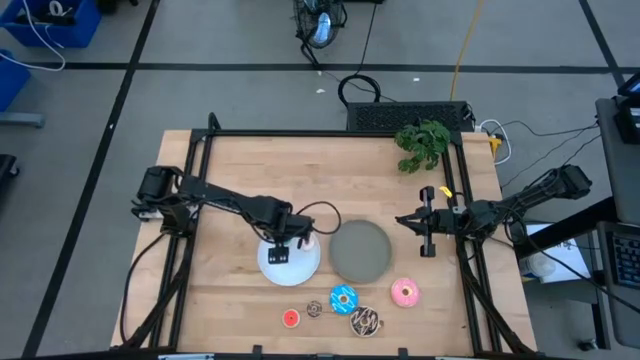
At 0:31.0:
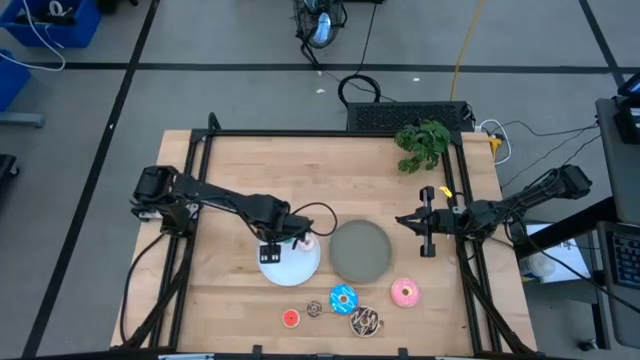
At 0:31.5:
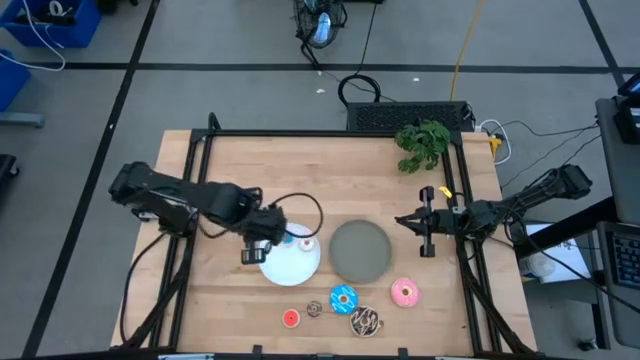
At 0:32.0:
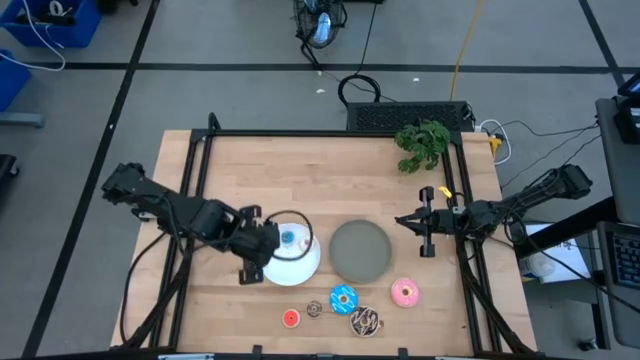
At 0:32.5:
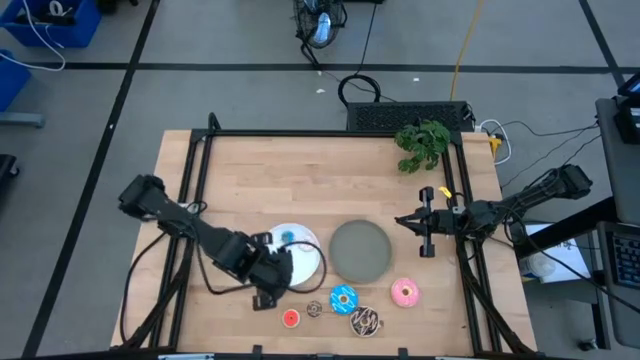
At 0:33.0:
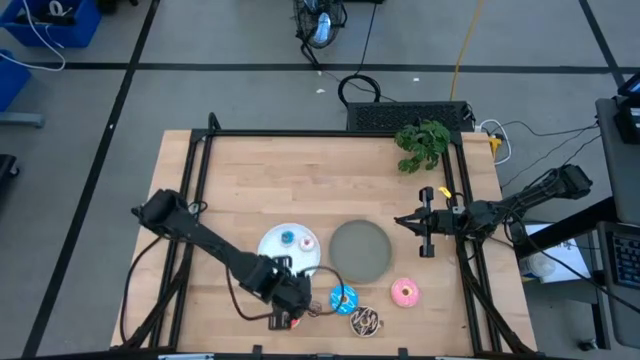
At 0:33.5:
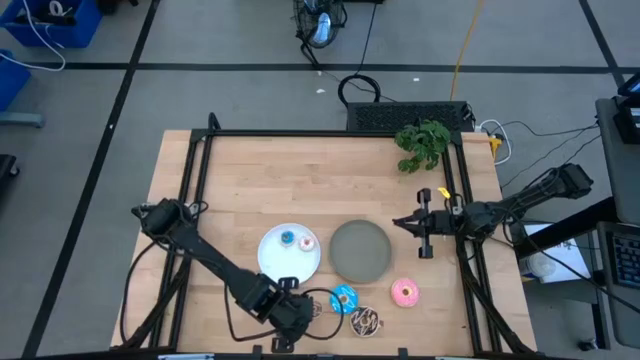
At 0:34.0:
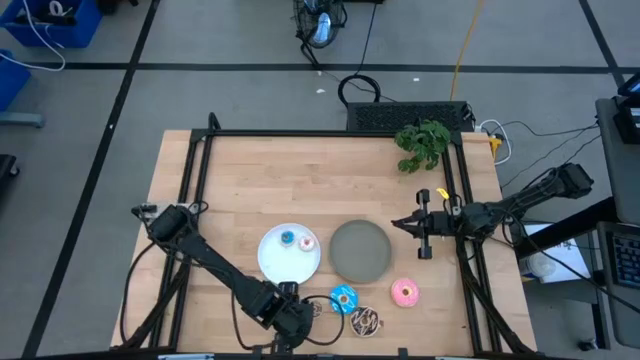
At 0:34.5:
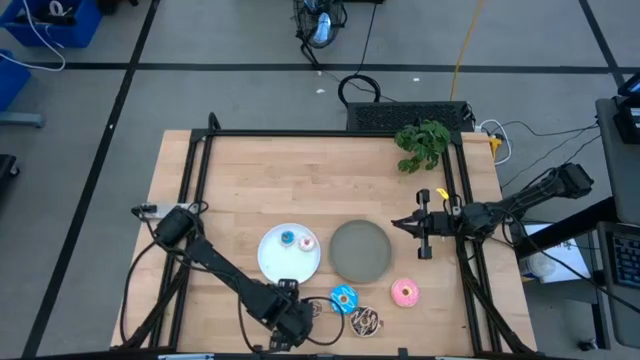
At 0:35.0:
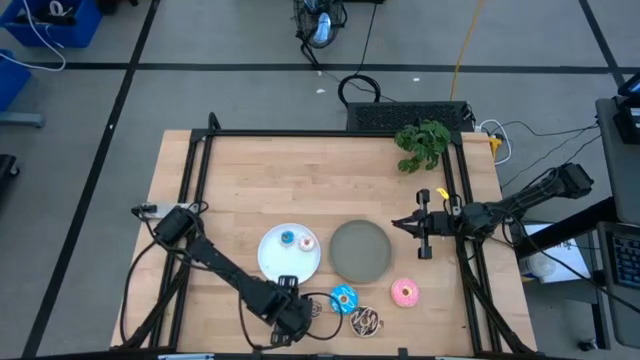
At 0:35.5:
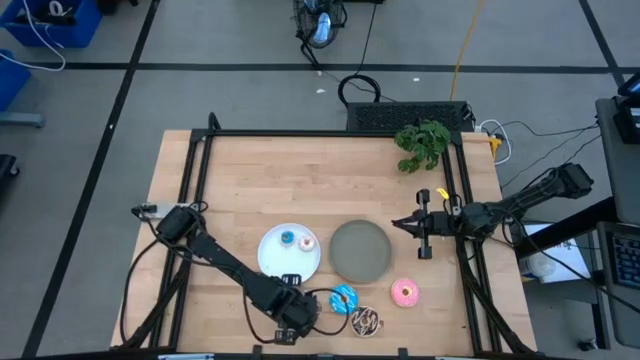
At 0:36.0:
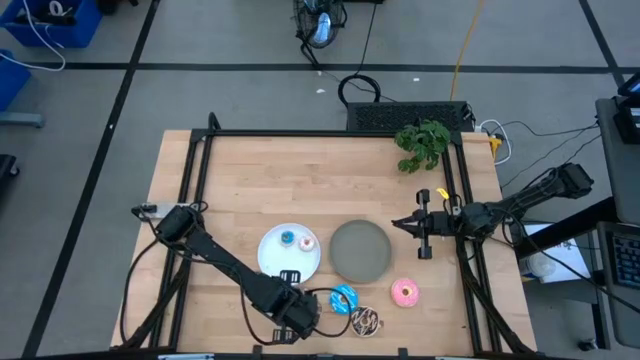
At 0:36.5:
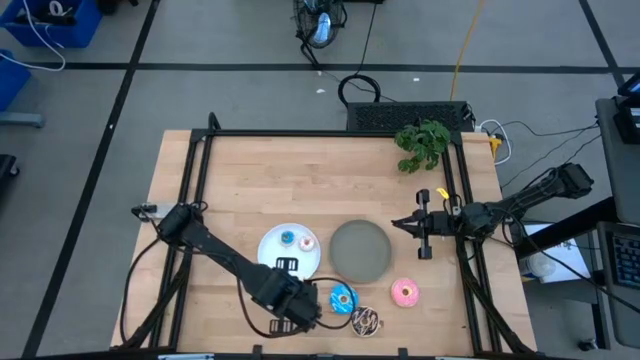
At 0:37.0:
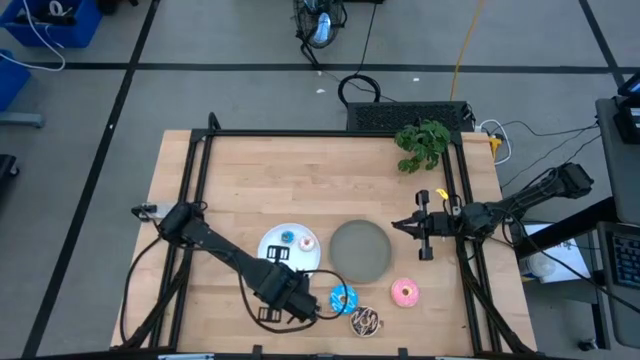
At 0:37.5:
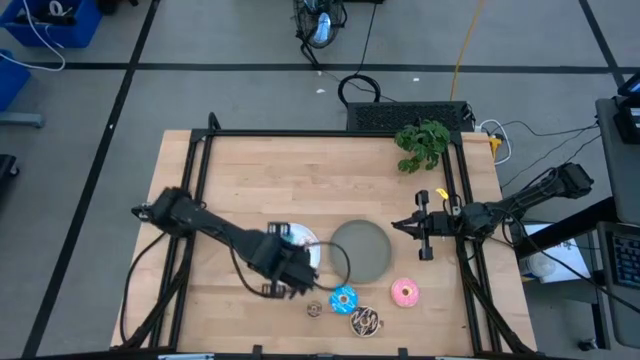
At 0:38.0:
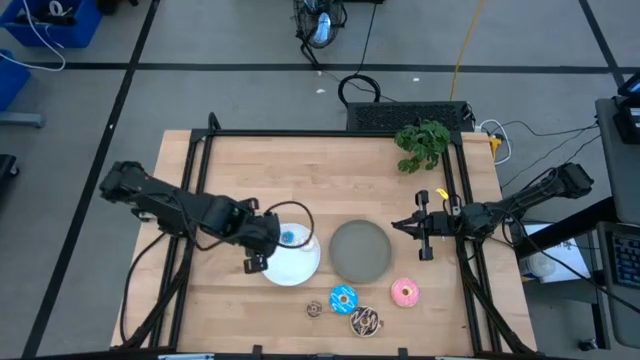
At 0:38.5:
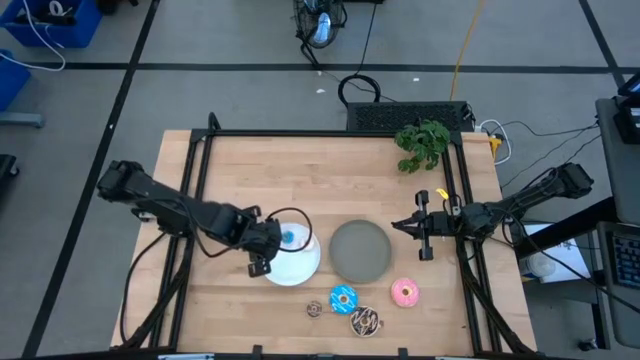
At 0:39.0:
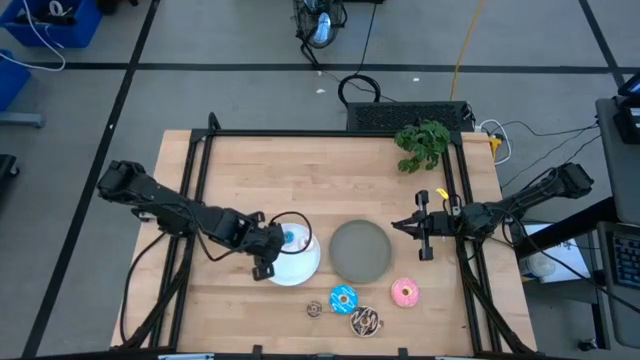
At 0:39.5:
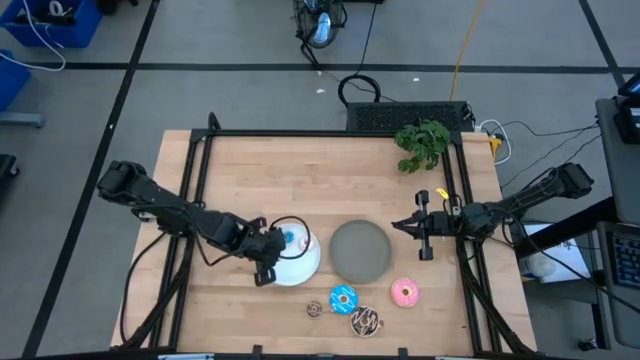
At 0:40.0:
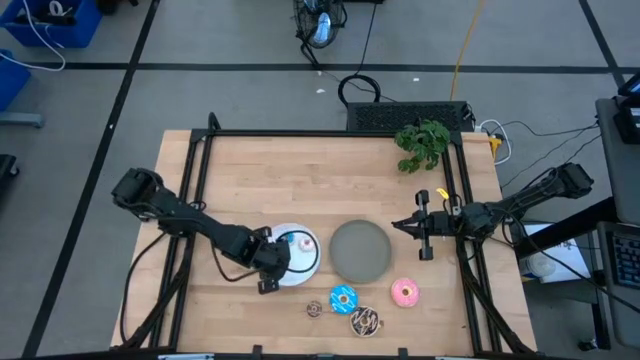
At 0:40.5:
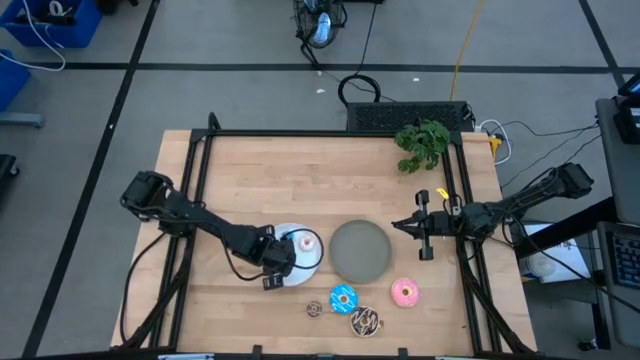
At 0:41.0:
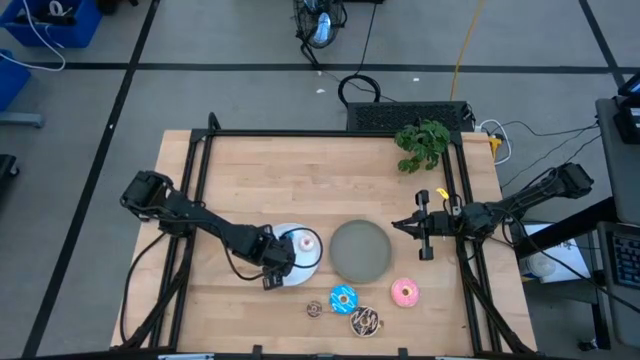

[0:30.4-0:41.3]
Task: Pick & Place donuts
Put the small orange donut on the white plate

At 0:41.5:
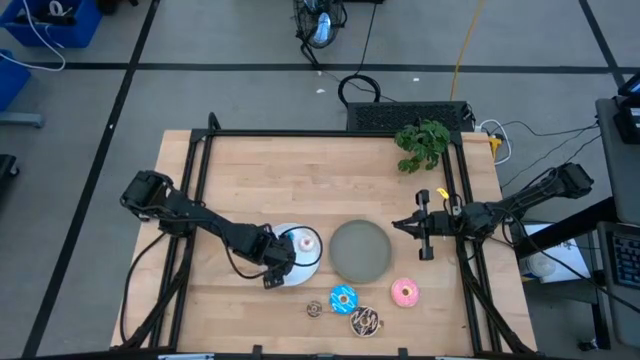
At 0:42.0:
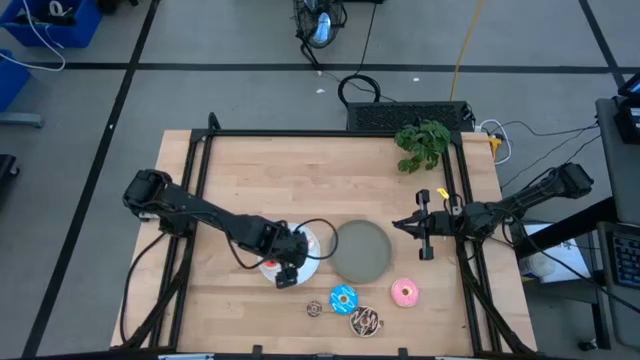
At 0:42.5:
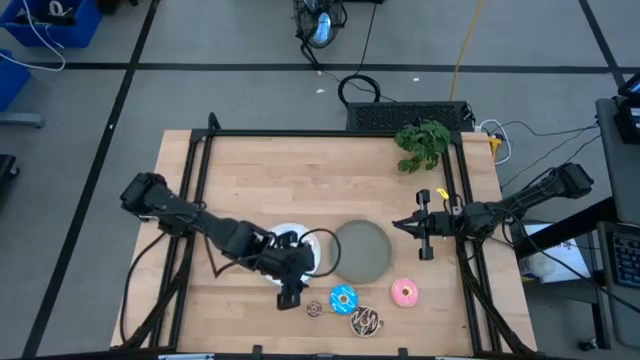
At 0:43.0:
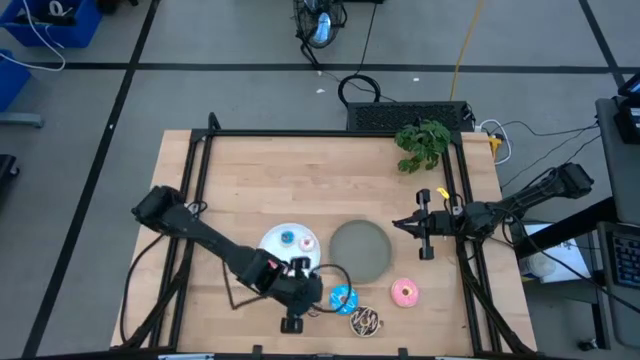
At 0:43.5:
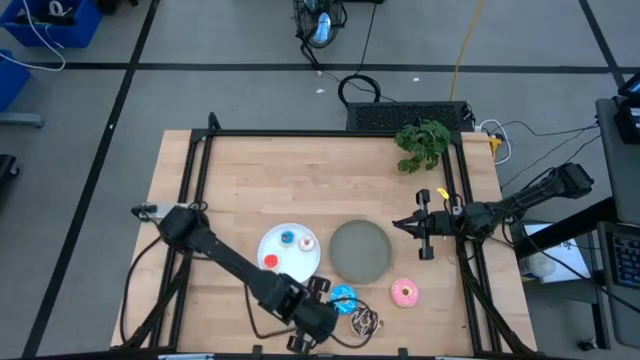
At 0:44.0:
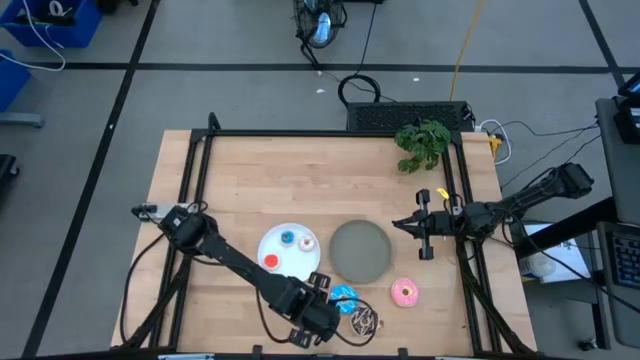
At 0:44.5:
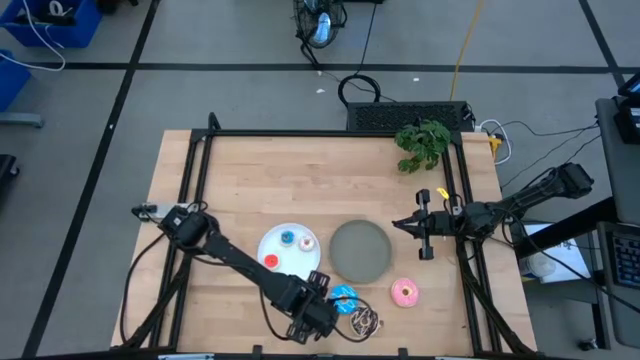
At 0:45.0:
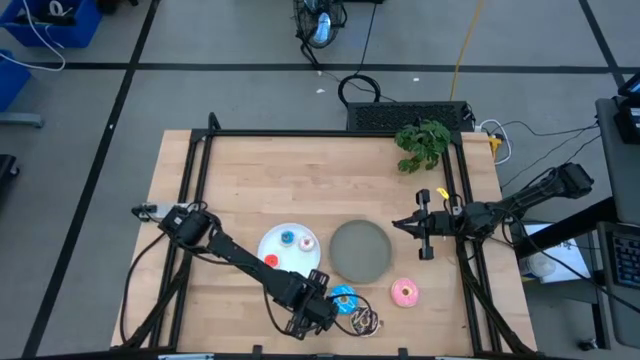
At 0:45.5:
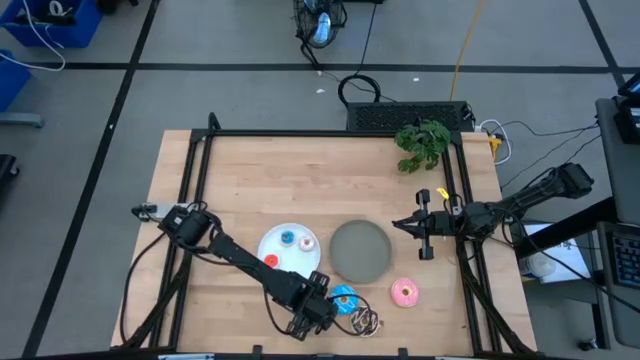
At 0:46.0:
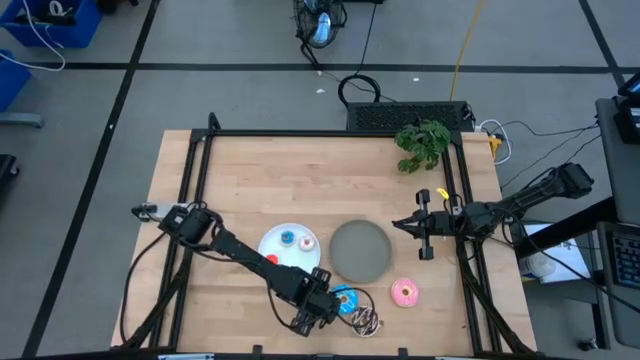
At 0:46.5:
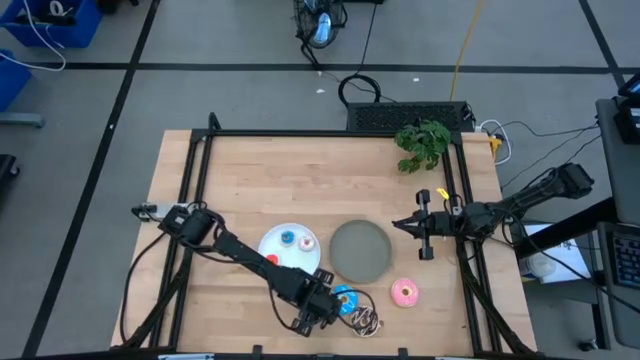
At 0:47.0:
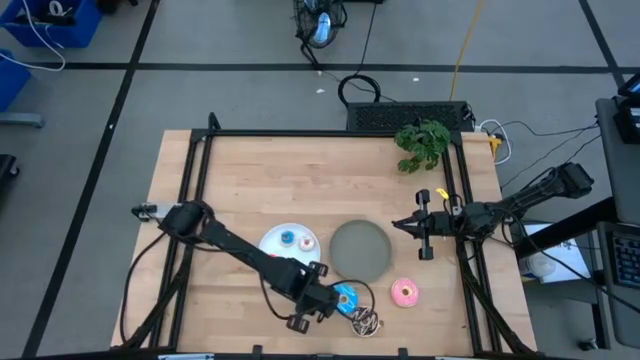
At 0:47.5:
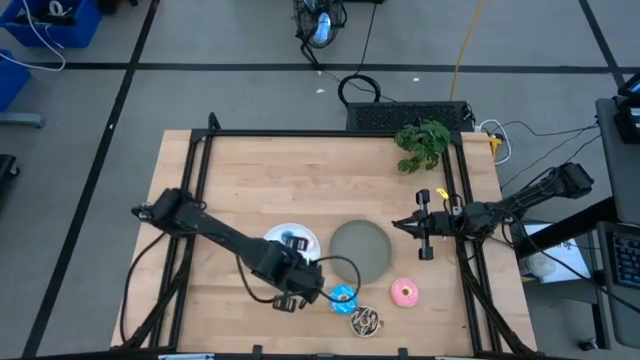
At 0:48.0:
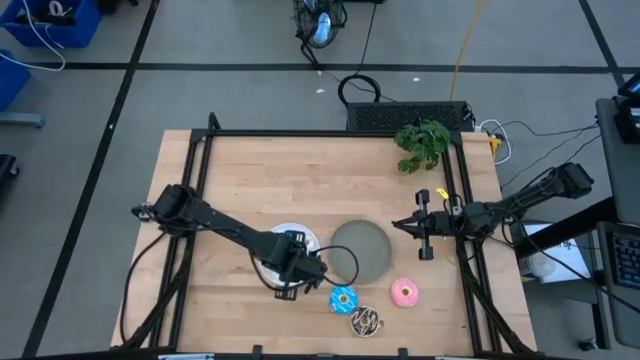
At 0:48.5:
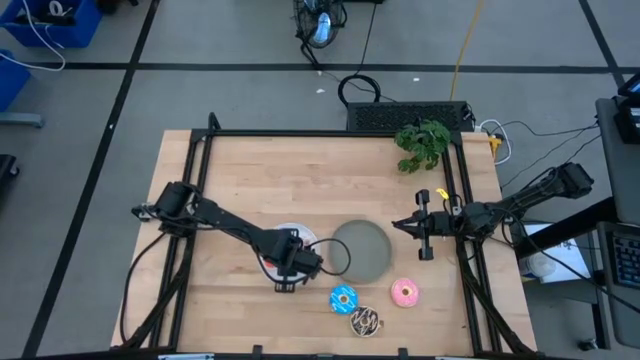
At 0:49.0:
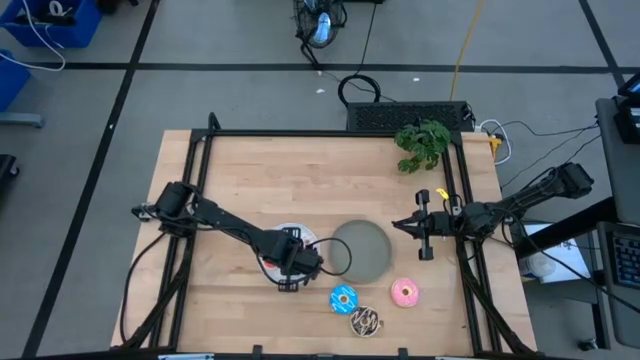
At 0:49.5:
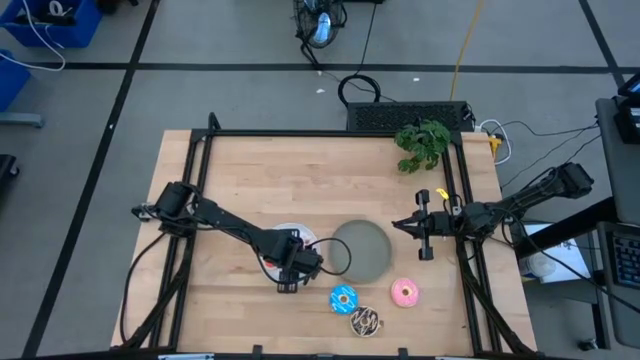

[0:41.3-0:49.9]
Put the small brown donut on the white plate

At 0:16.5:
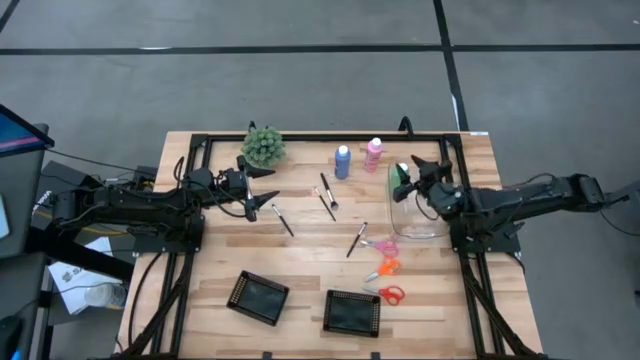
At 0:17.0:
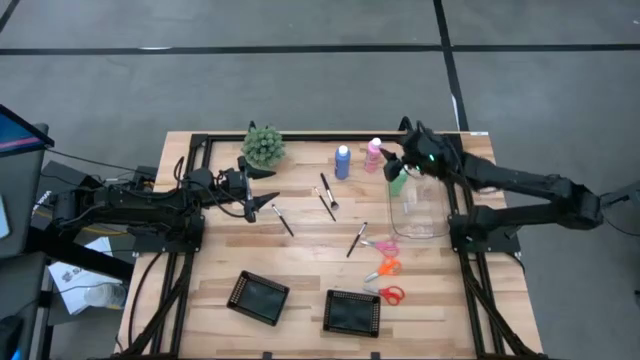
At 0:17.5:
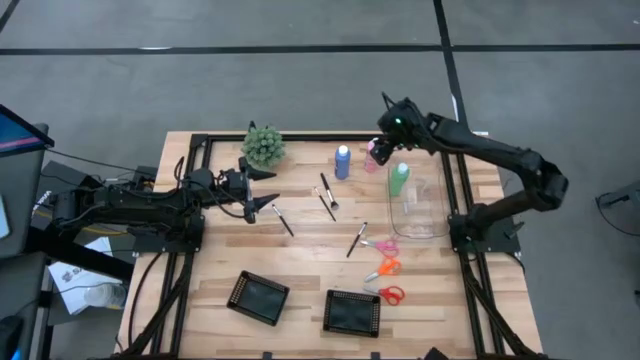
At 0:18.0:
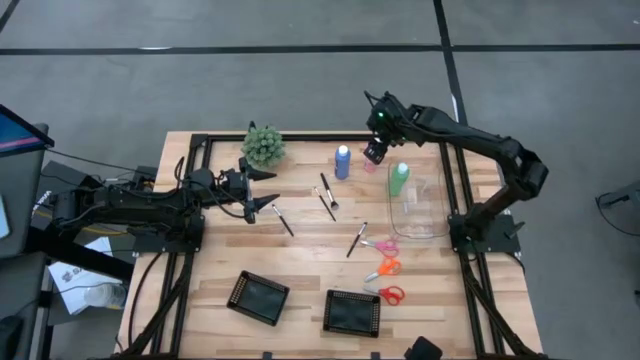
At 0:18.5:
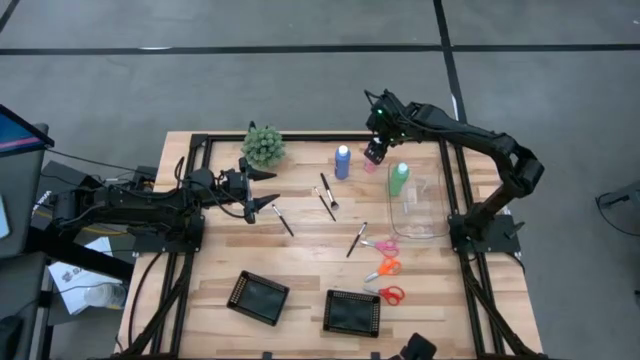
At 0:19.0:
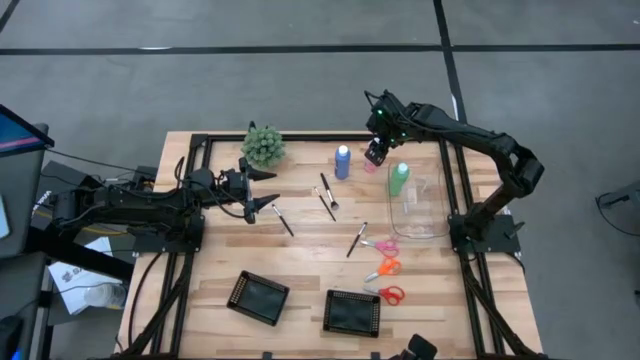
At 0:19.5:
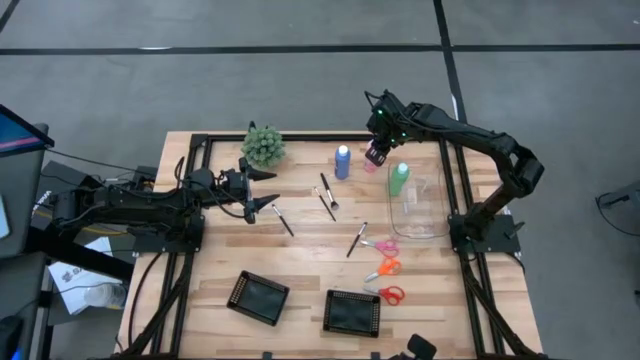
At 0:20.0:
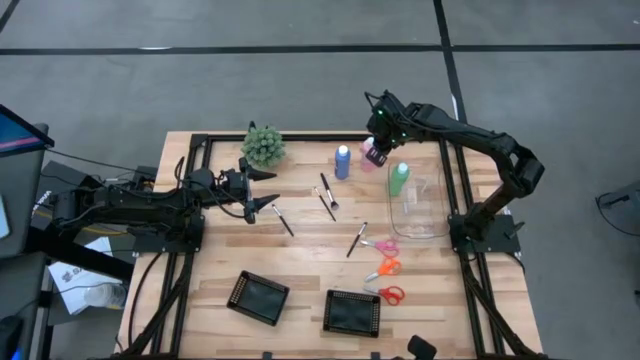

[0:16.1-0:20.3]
Task: Pick & Place Paint Supplies
Put the pink paint bottle into the transparent bin
